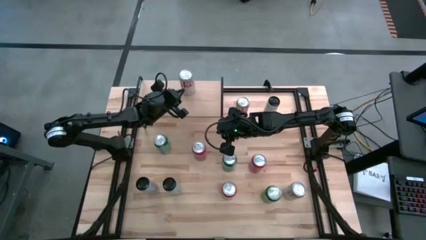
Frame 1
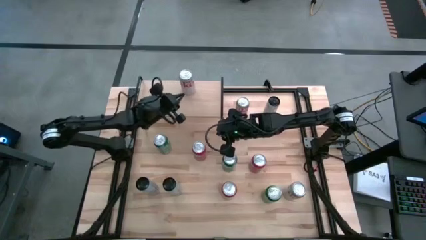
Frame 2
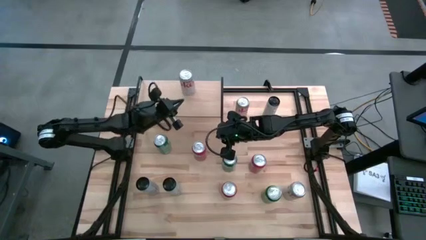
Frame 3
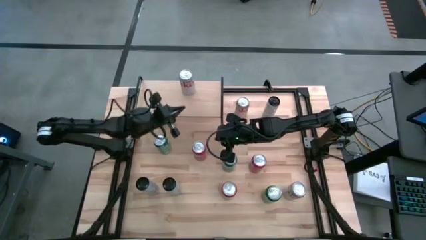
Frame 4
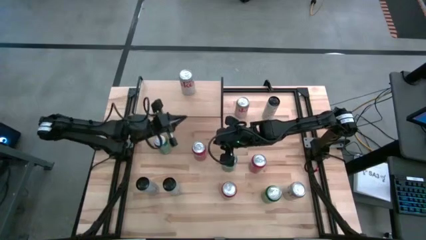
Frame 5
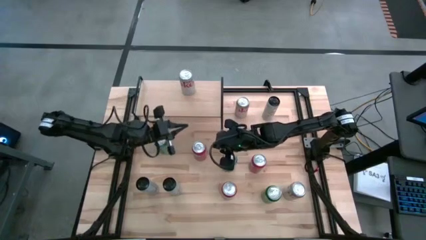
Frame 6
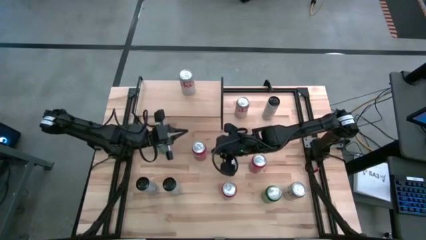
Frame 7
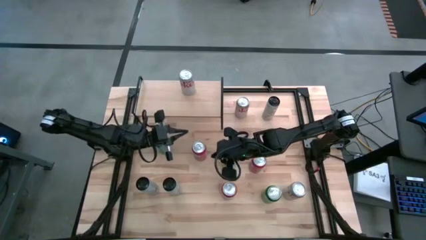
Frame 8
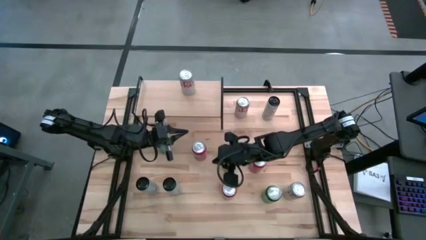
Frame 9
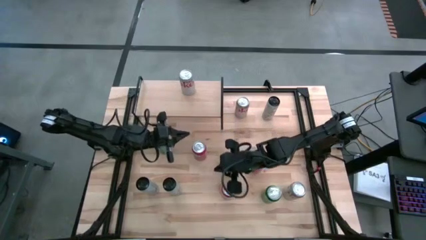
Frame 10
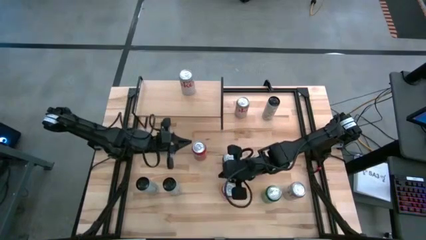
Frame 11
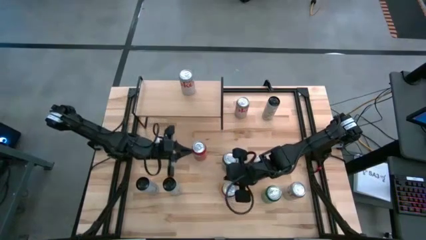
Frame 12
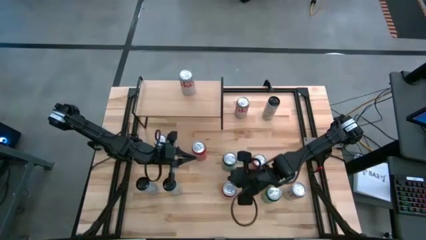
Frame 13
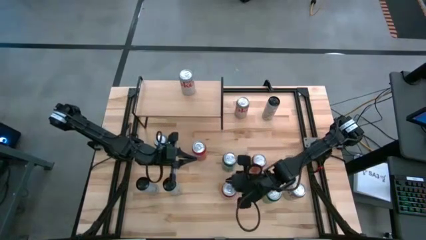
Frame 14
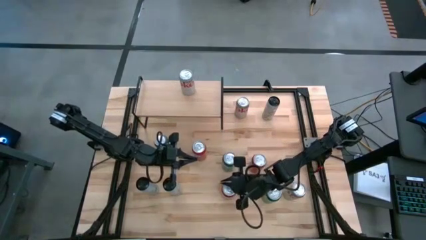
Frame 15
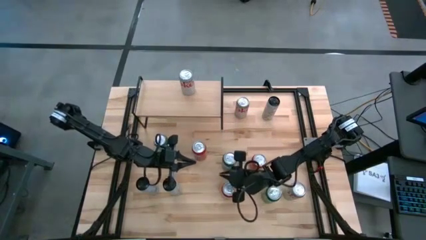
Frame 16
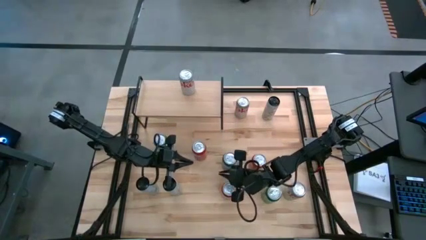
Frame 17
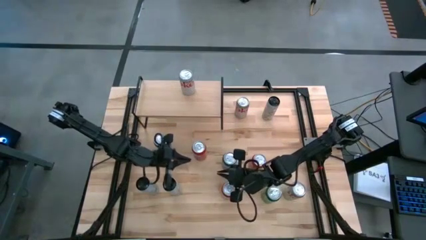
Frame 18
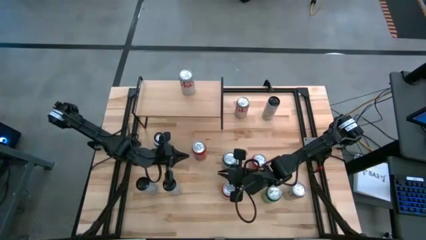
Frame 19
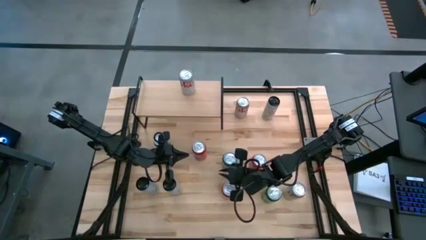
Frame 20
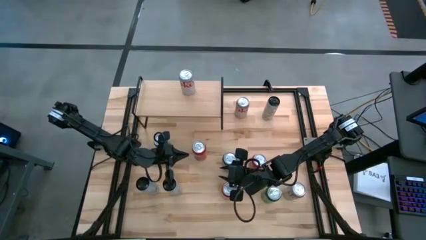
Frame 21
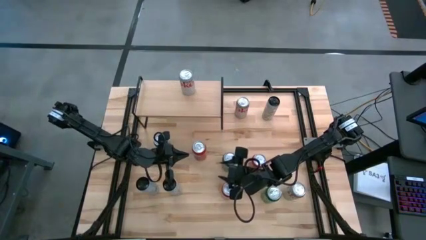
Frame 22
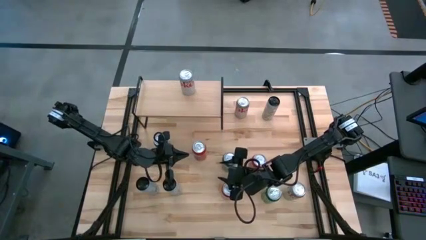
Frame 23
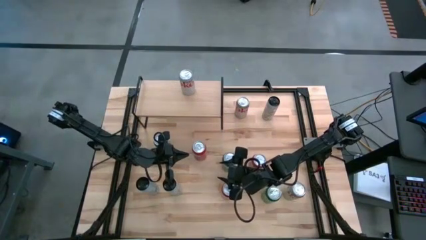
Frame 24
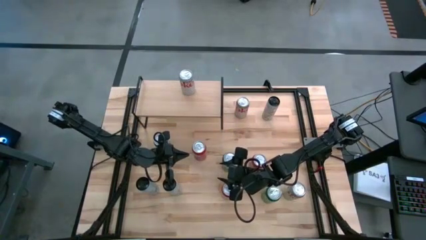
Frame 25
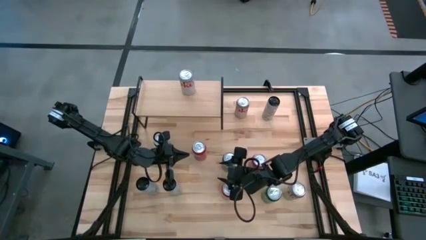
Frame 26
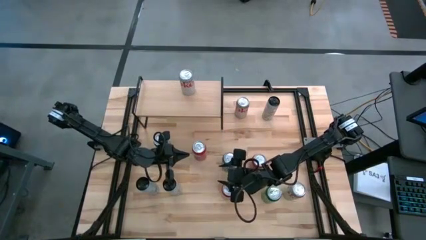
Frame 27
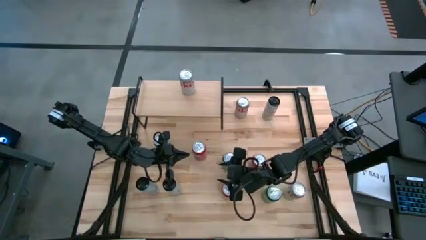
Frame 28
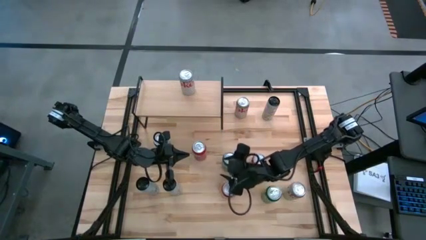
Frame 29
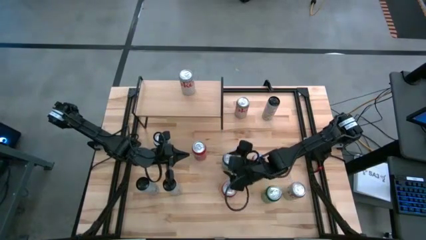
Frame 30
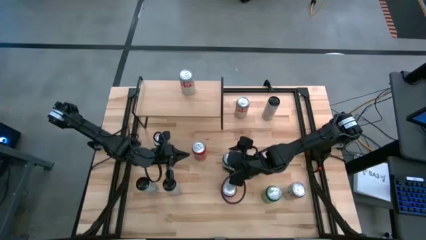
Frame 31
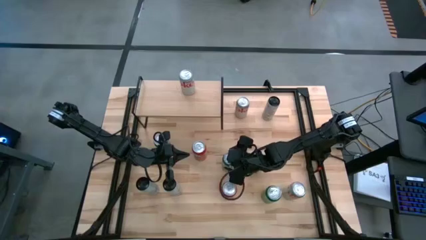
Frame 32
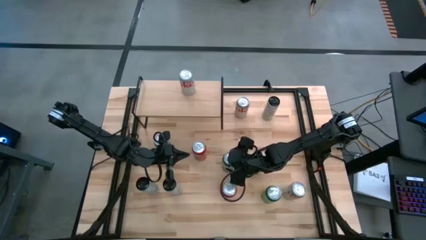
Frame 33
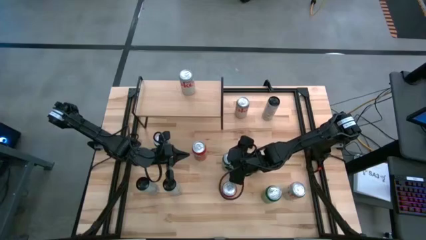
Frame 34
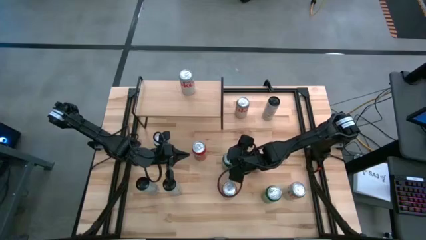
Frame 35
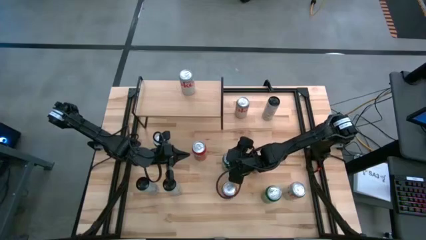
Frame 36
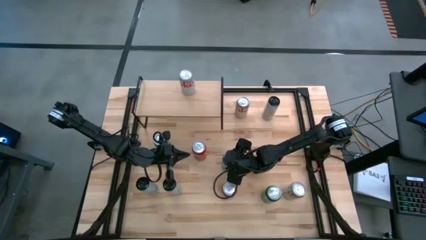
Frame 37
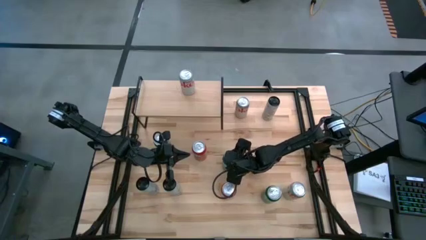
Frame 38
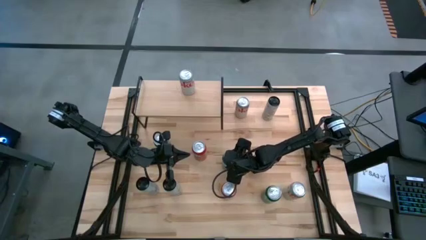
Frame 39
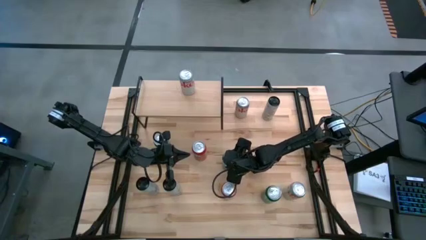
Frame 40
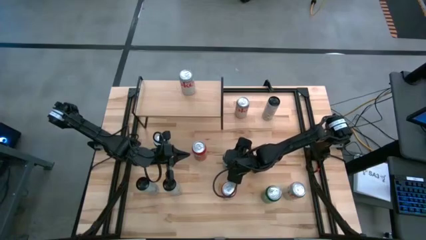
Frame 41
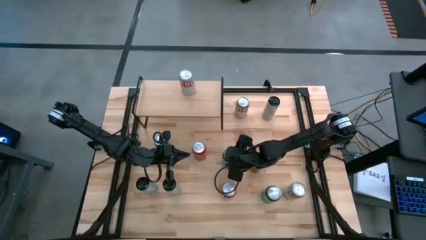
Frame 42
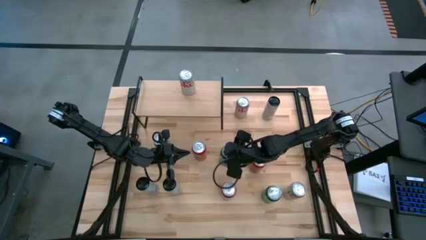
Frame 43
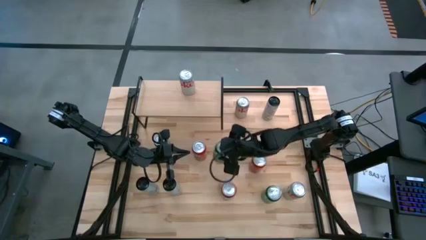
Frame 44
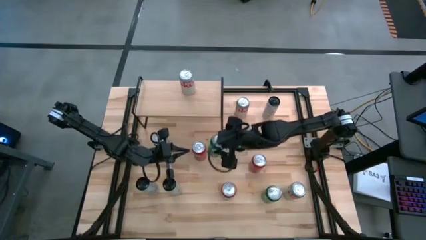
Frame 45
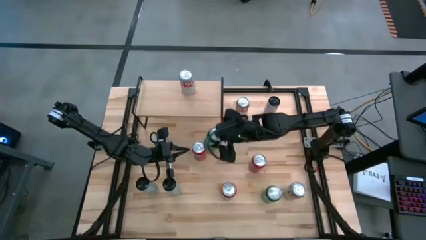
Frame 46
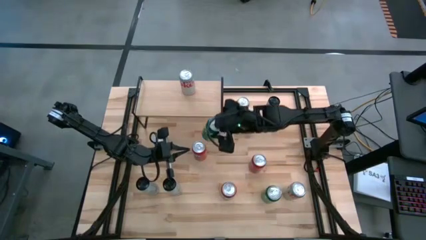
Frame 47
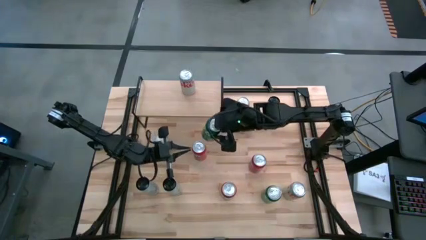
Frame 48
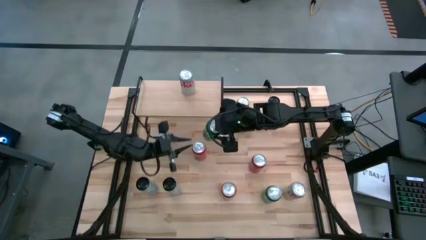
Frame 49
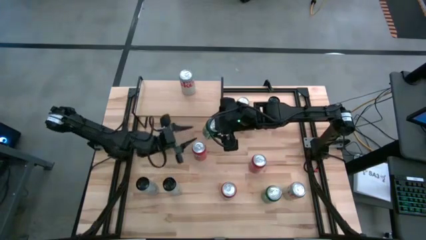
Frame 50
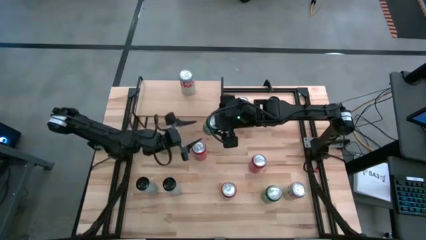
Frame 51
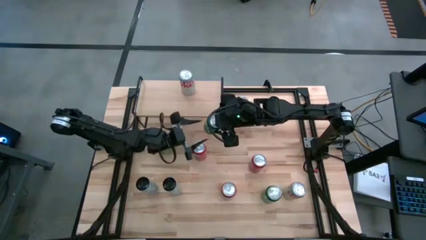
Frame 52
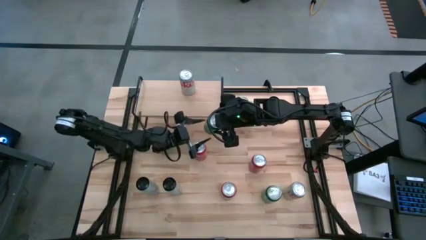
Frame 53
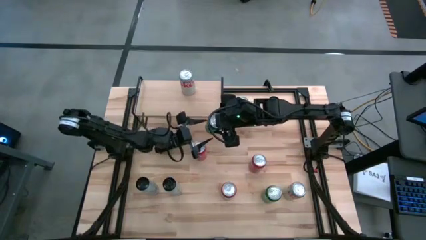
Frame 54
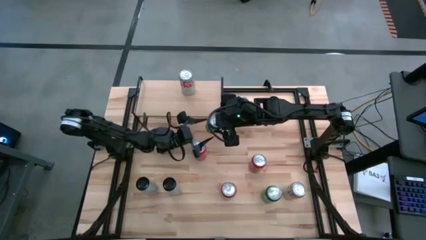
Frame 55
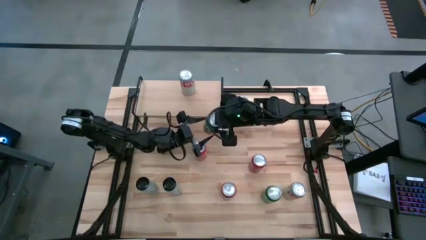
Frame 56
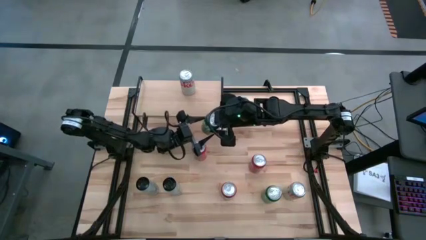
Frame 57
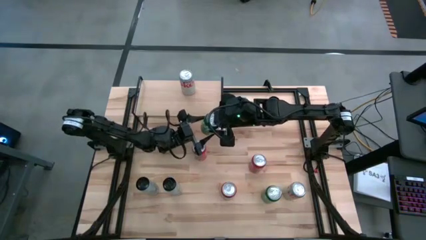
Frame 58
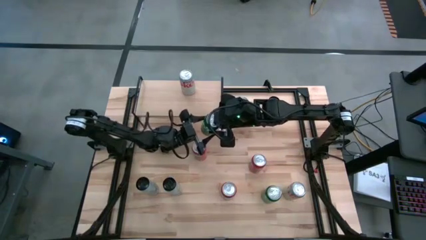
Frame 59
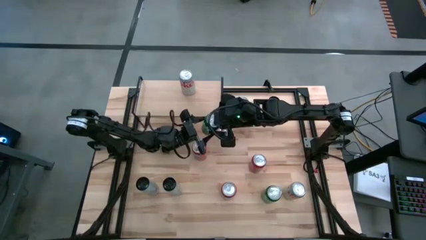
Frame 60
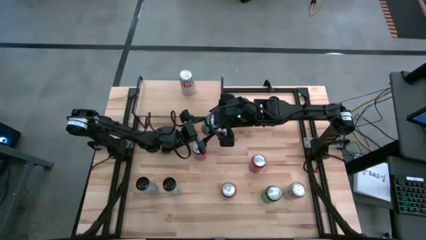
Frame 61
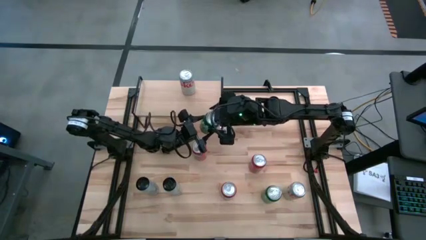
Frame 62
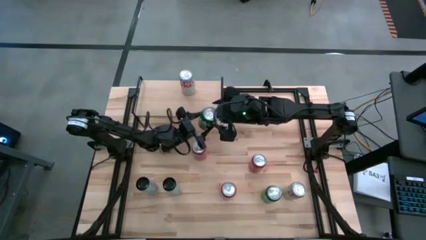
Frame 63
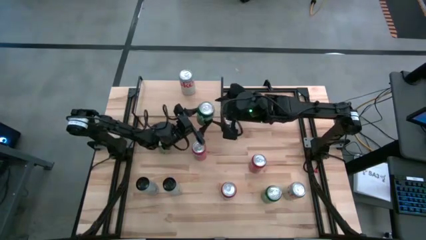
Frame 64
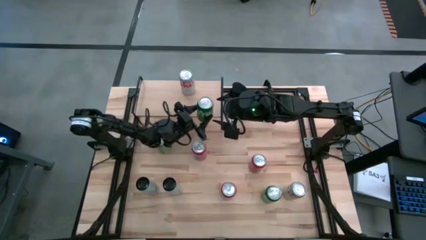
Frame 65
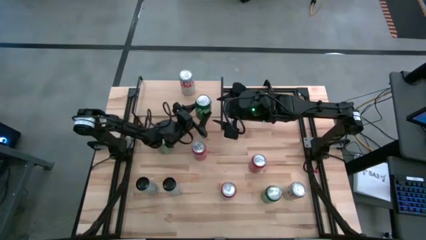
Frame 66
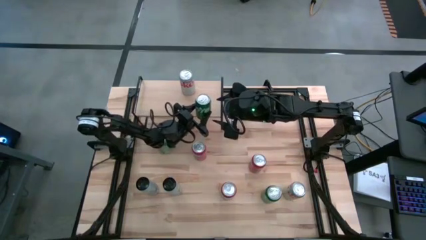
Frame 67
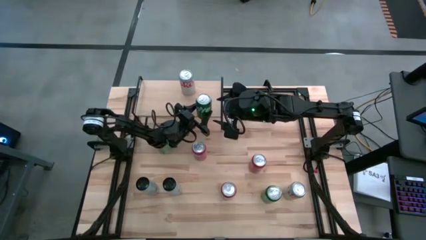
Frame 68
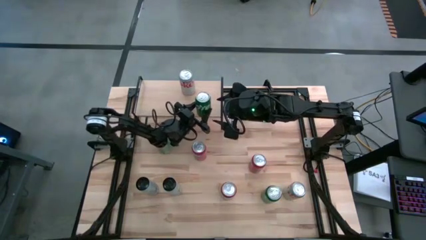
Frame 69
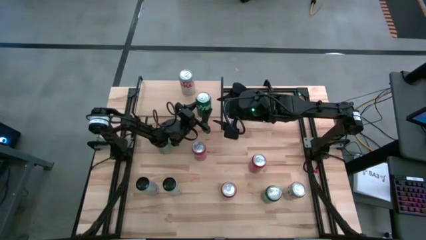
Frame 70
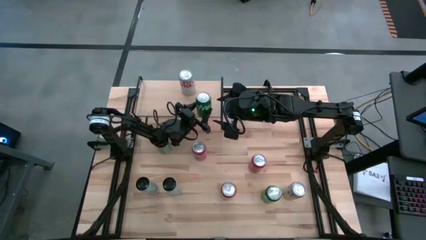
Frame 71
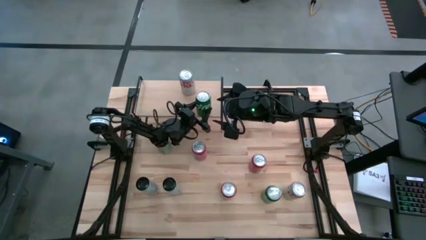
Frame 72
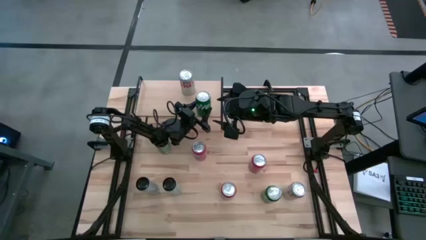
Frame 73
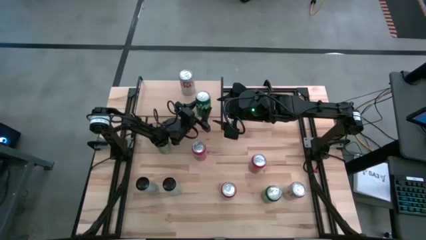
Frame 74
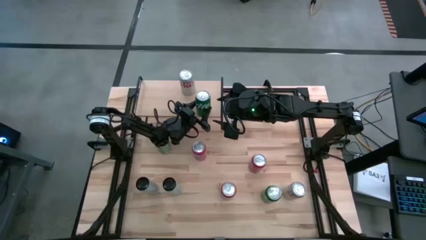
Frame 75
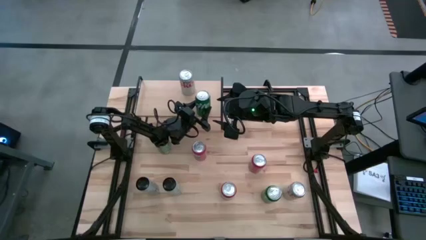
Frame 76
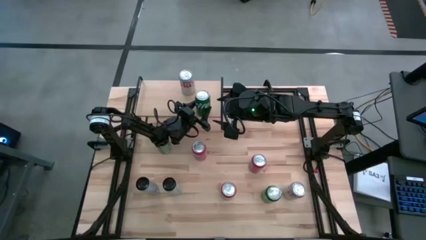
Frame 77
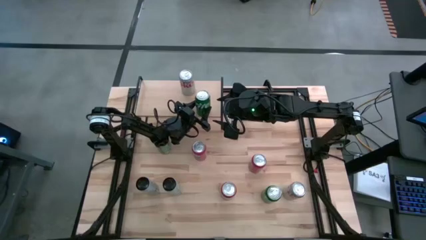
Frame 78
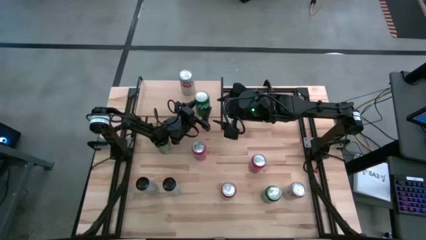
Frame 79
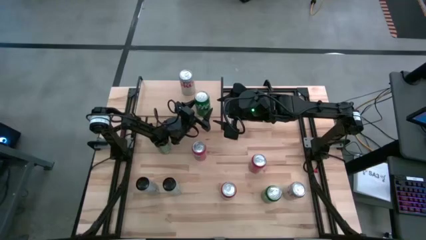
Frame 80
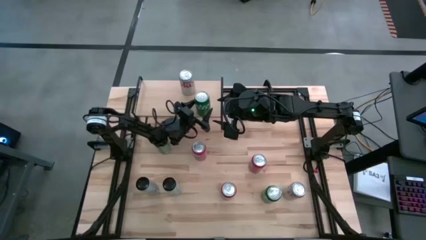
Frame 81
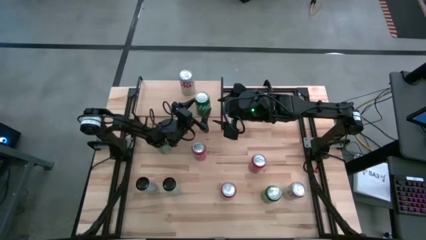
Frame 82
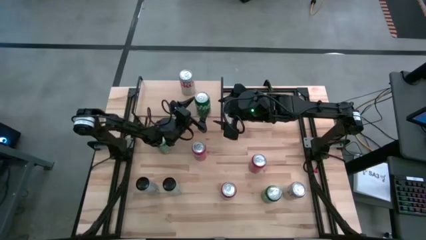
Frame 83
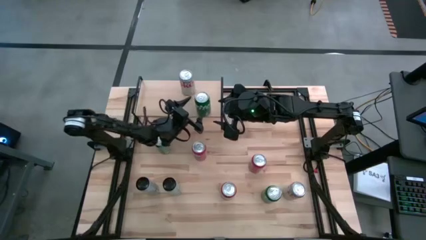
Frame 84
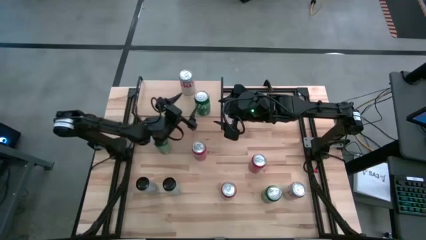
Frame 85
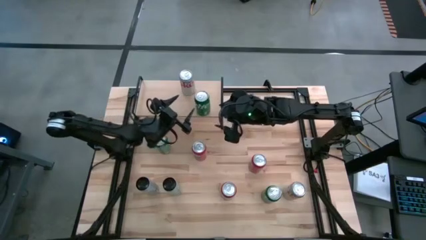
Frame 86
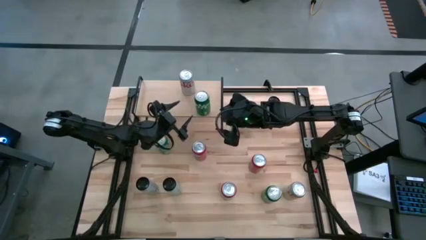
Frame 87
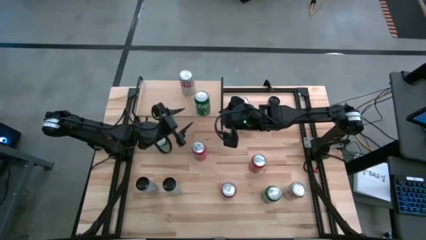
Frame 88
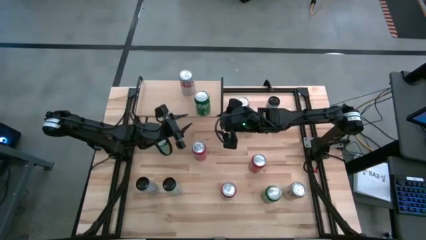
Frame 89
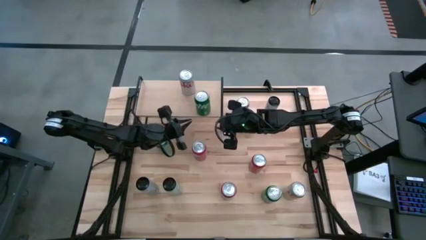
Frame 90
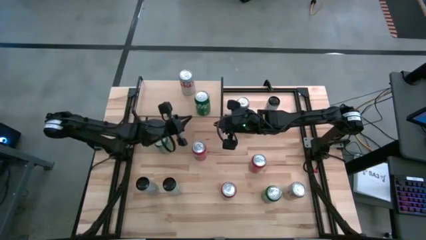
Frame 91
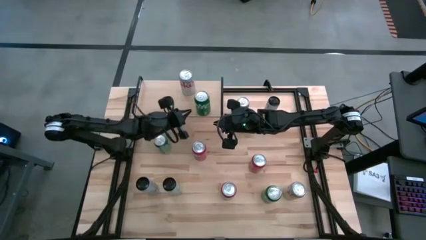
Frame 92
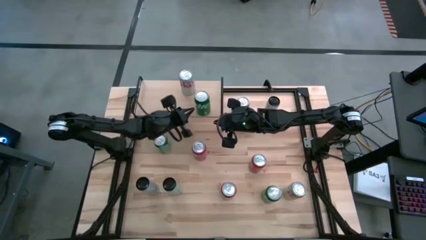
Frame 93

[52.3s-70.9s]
Task: Place canned beverage on shelf
Put the middle green soda can on the shelf
